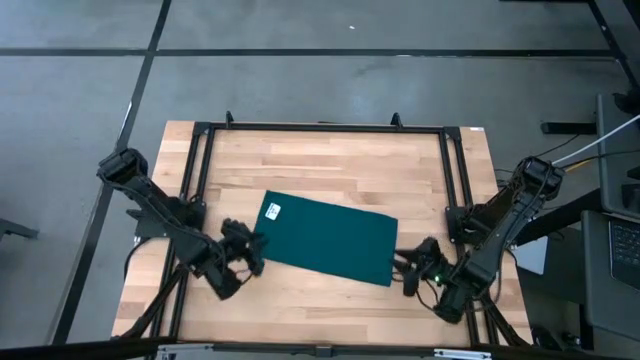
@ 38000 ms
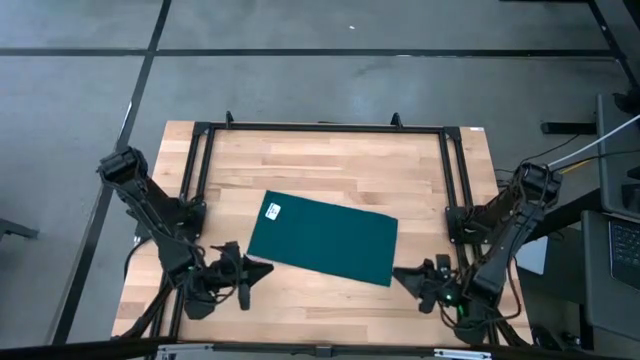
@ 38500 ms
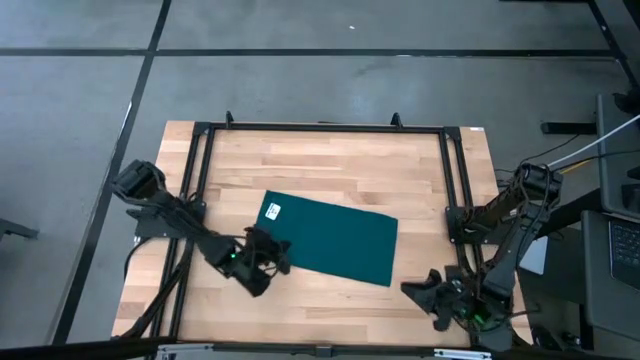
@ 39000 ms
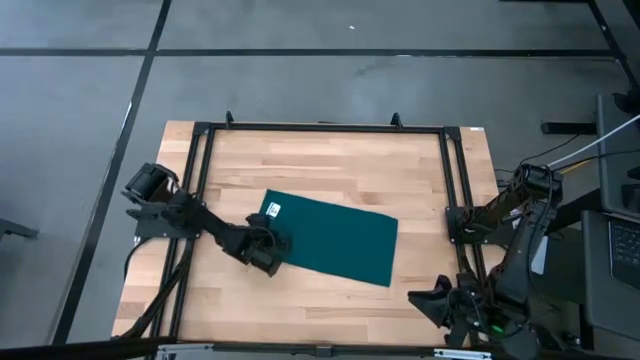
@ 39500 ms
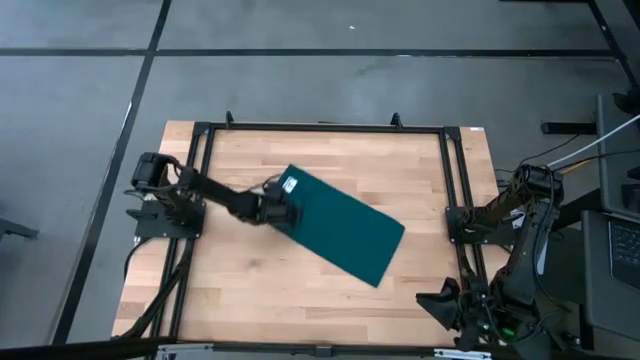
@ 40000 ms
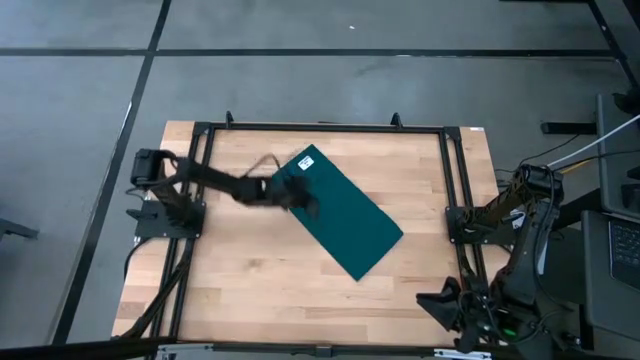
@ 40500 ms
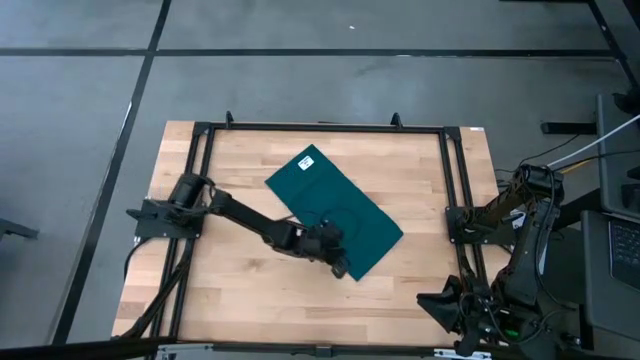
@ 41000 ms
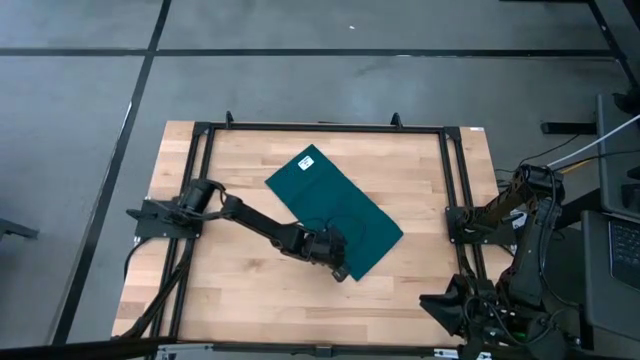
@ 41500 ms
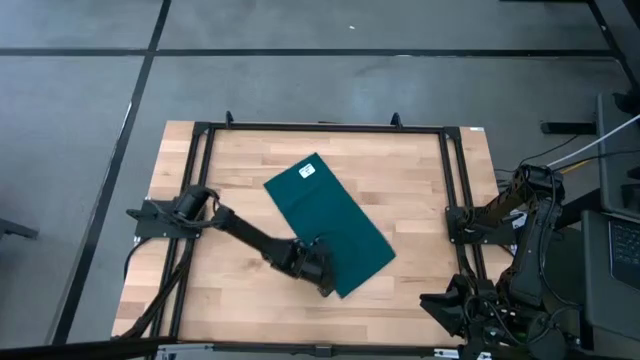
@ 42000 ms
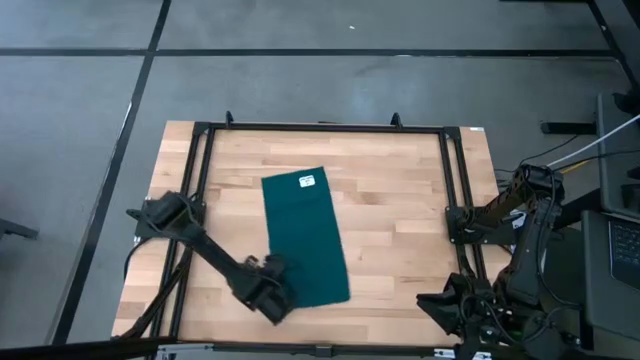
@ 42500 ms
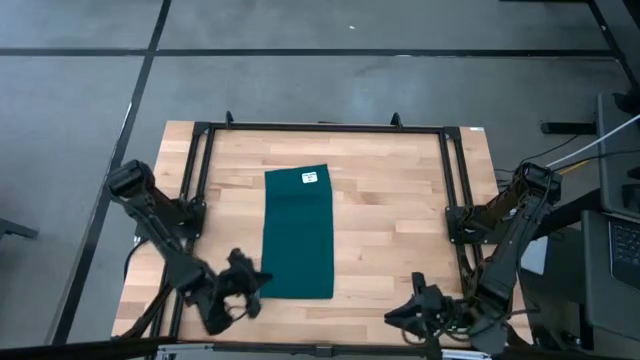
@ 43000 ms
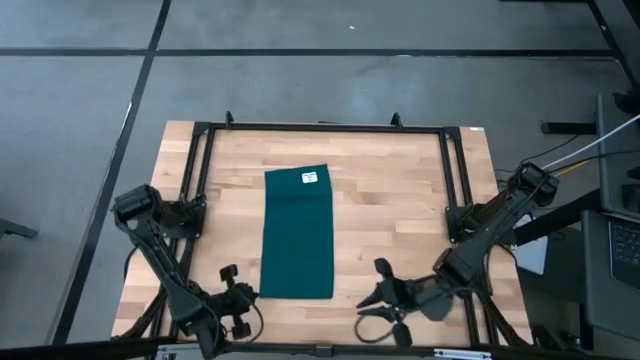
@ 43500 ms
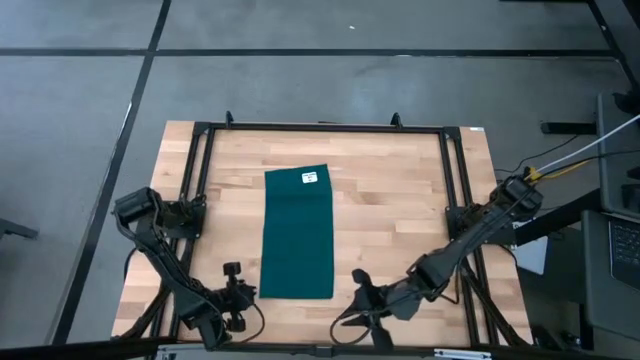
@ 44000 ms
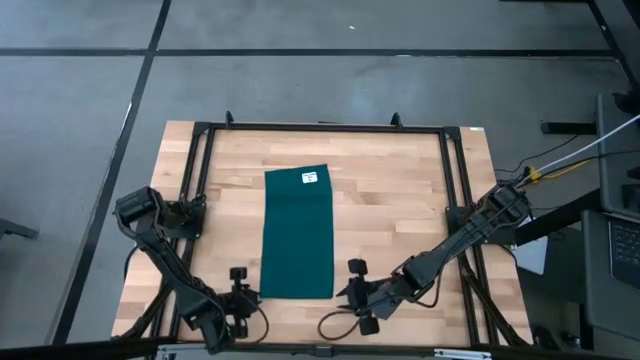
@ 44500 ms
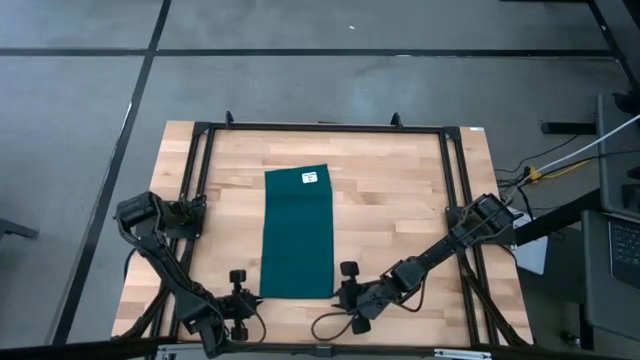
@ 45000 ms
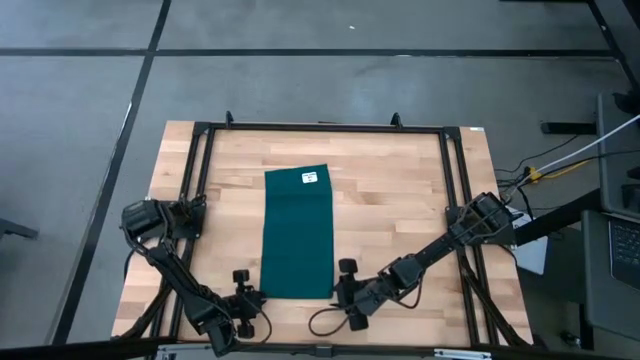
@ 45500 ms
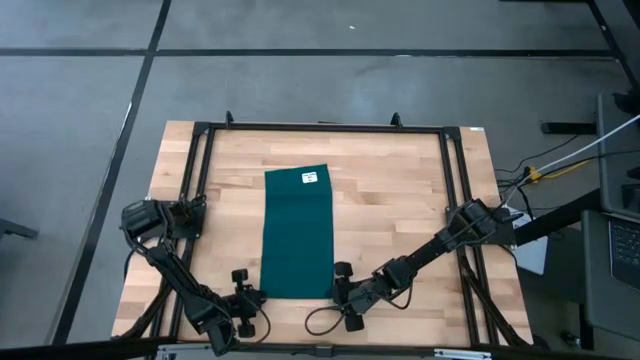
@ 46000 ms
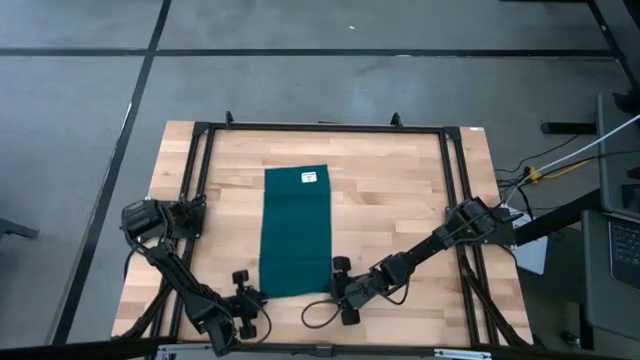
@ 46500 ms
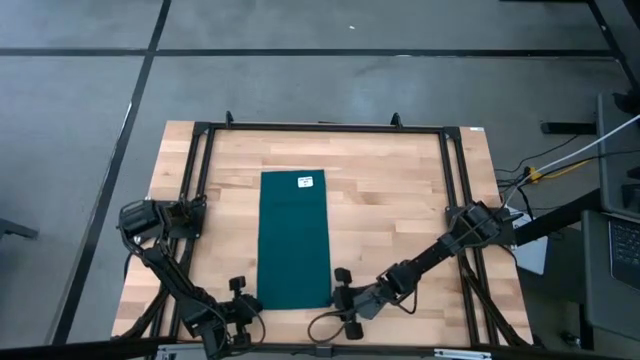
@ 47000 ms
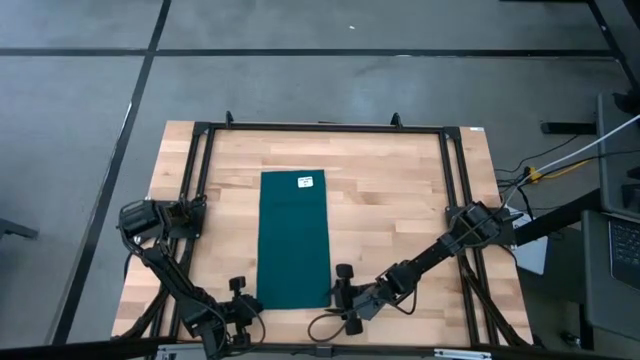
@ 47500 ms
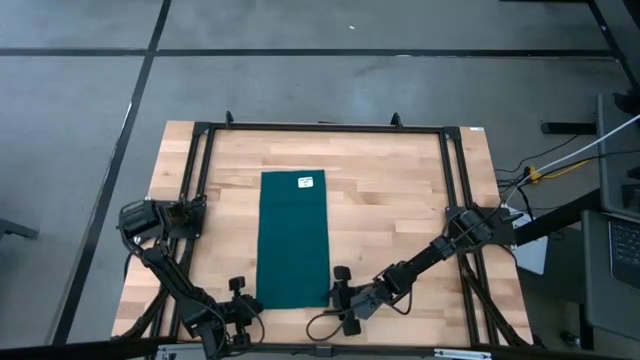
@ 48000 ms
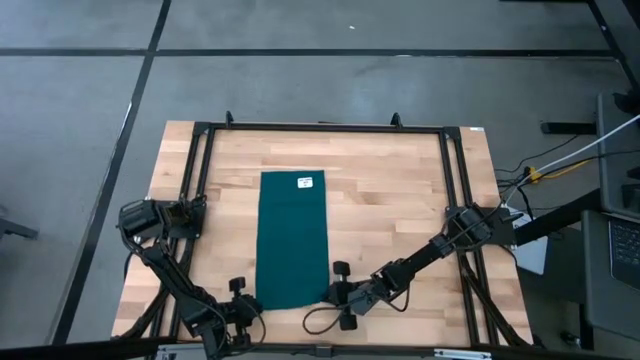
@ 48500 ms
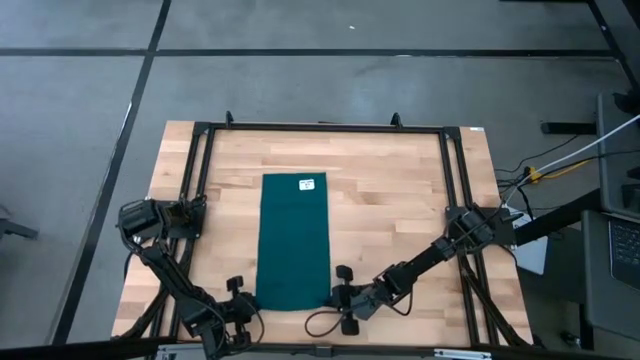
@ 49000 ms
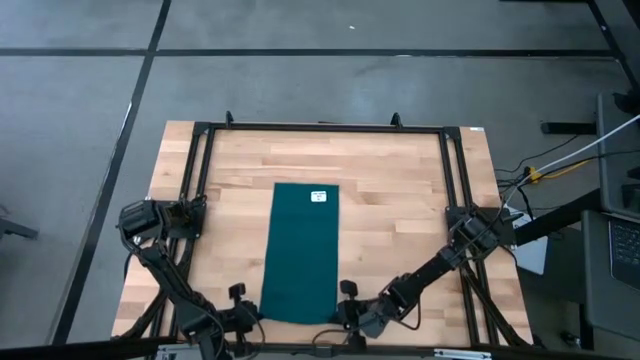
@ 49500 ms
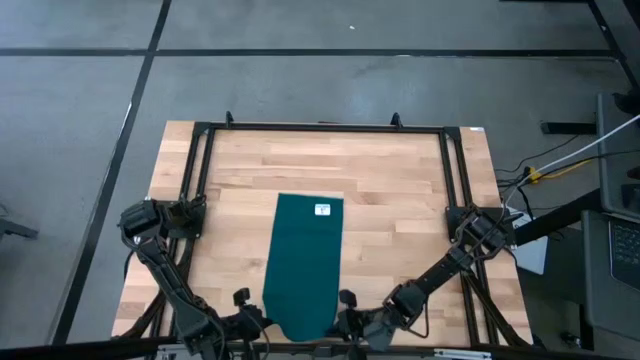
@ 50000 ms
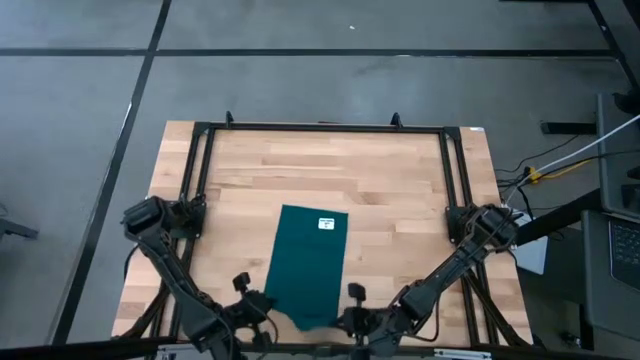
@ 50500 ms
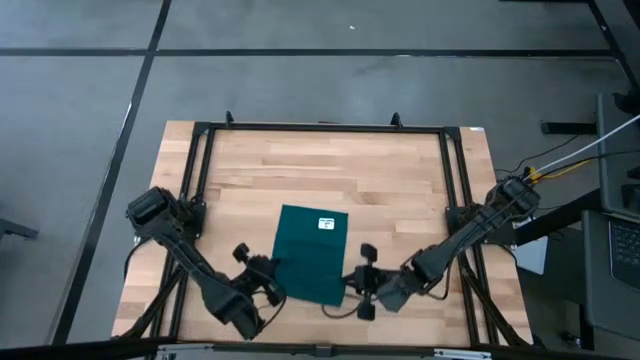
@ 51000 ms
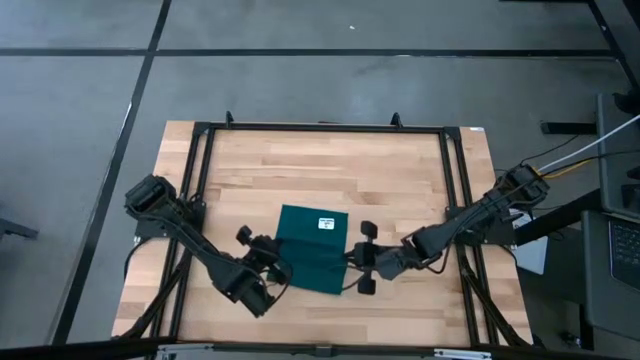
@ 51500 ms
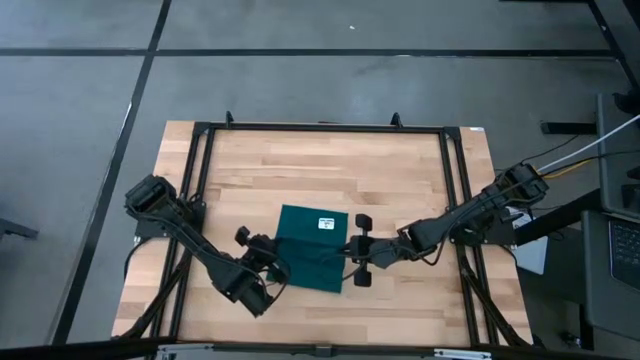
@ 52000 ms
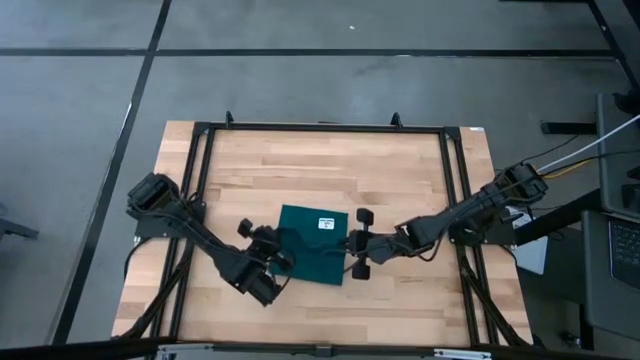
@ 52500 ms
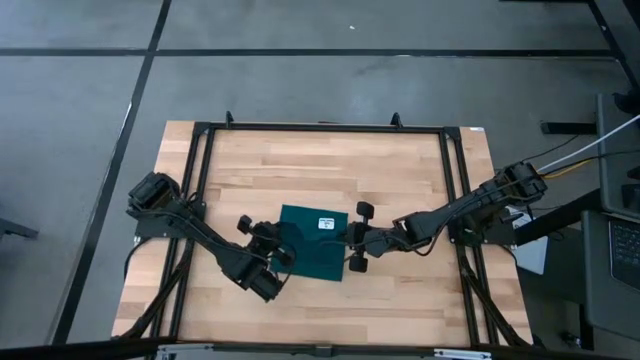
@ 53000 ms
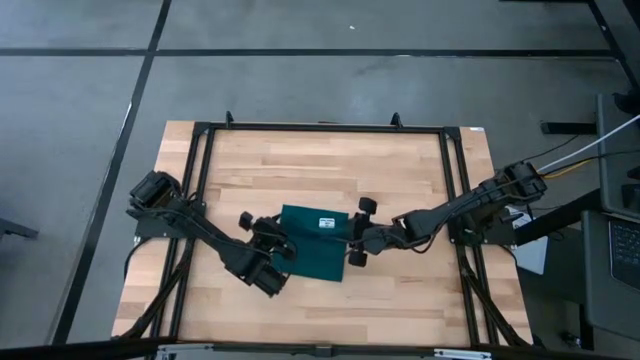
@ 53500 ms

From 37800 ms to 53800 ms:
Task: Fold microfiber towels
Fold the green towel

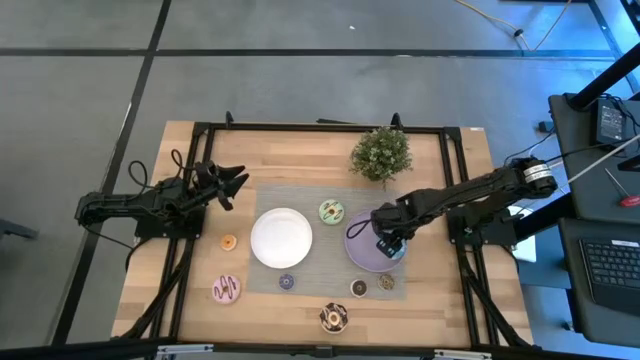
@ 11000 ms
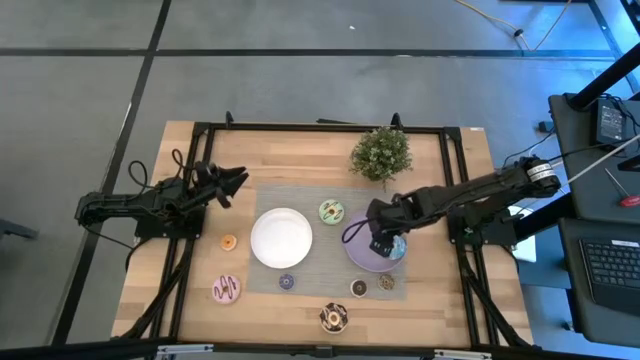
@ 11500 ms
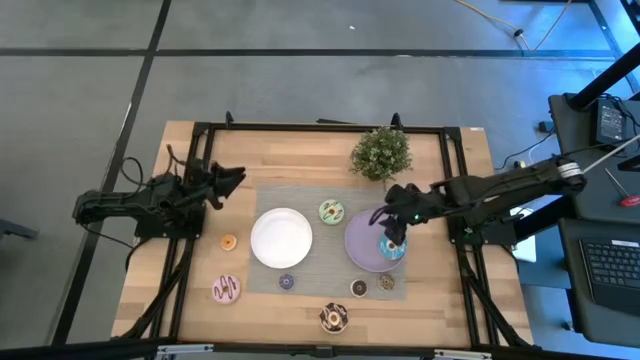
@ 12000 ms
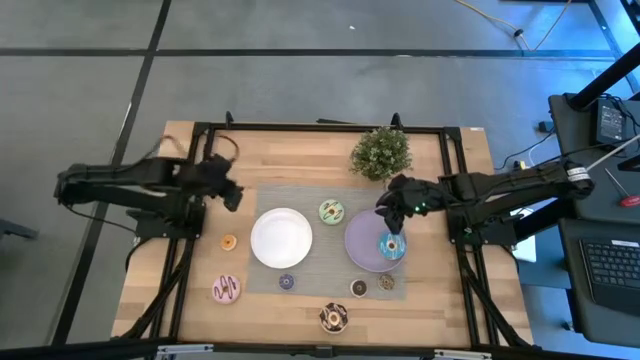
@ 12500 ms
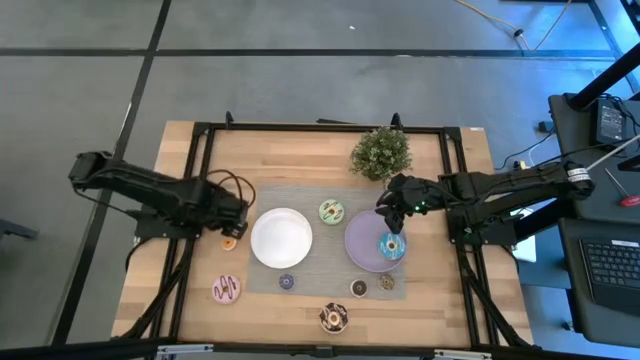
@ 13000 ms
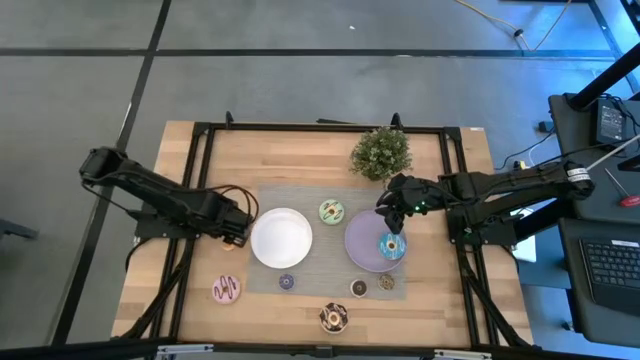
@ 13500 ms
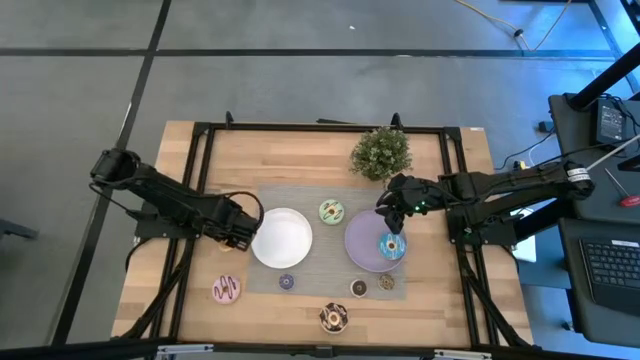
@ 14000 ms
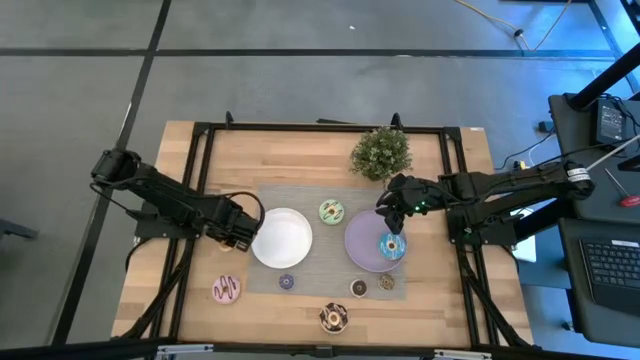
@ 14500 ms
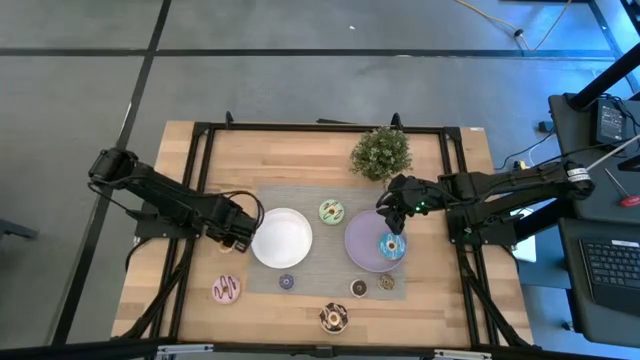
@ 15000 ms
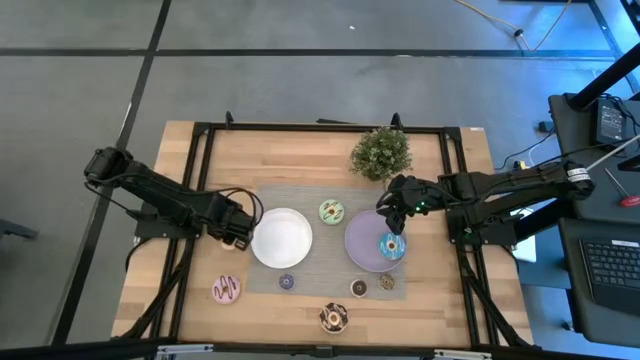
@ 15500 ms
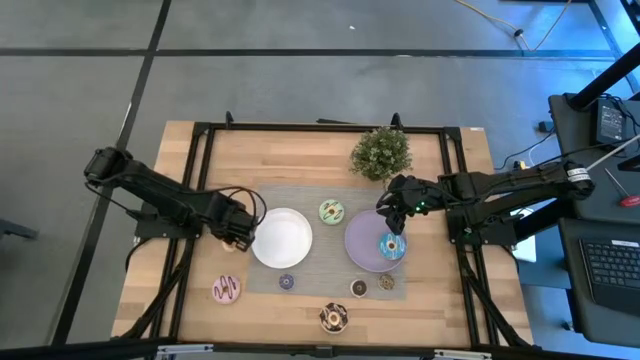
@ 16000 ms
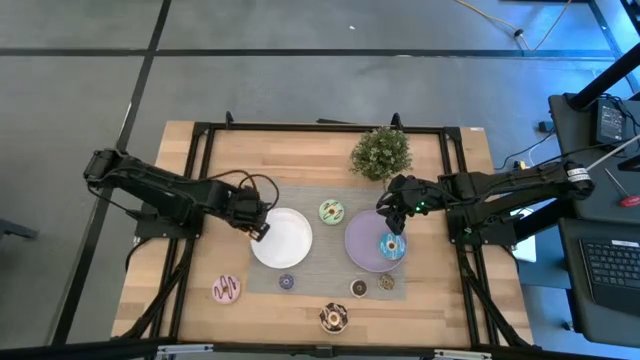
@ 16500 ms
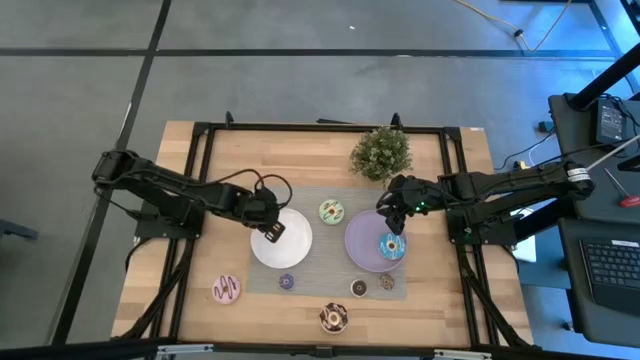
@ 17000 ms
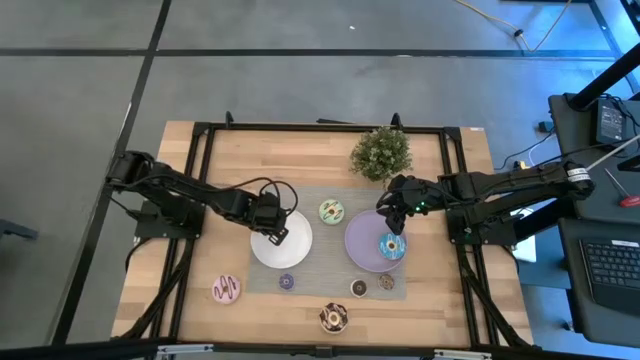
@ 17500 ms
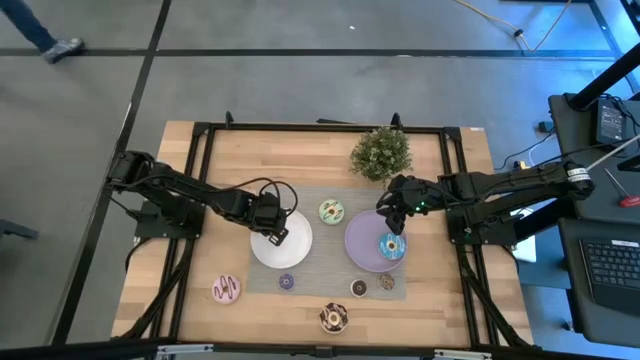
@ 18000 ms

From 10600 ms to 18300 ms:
Task: Pick & Place donuts
Put the small yellow donut on the white plate
